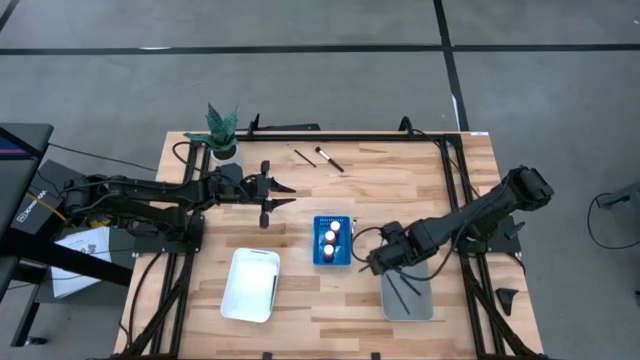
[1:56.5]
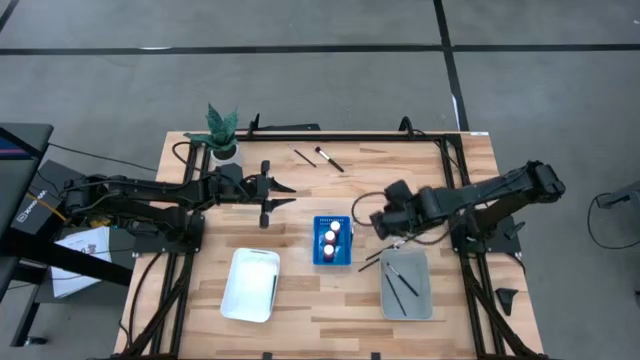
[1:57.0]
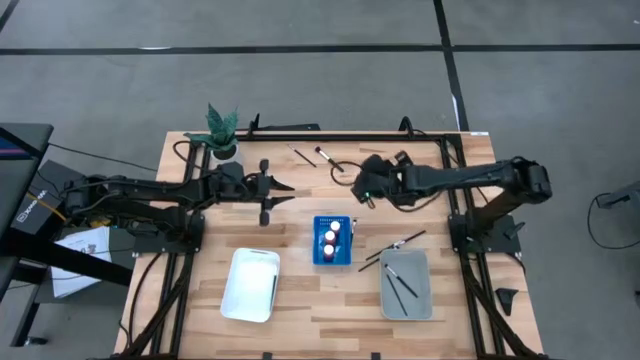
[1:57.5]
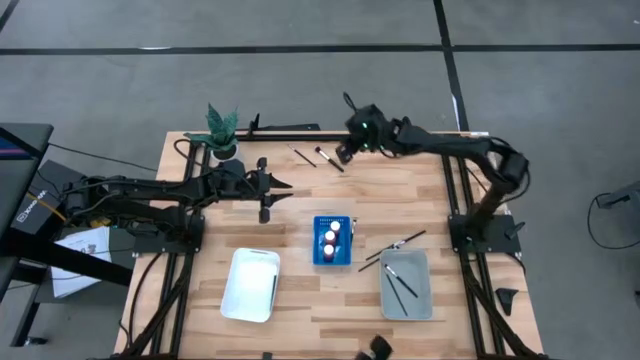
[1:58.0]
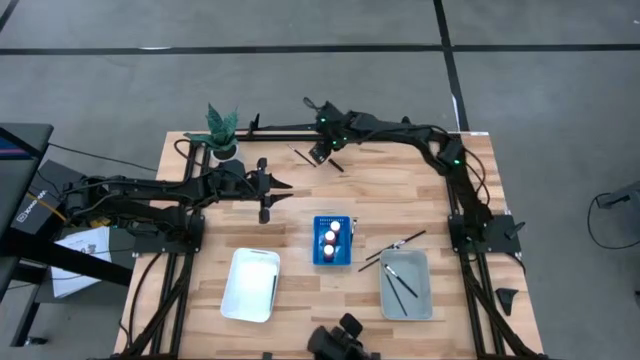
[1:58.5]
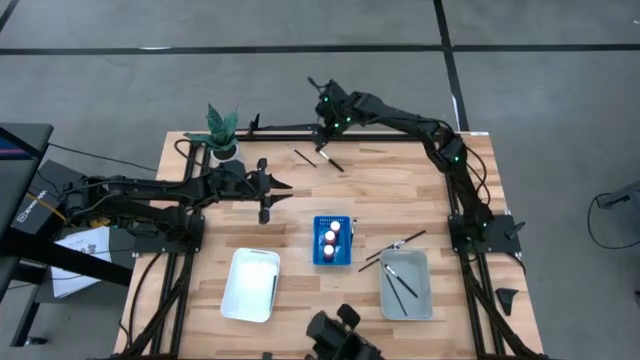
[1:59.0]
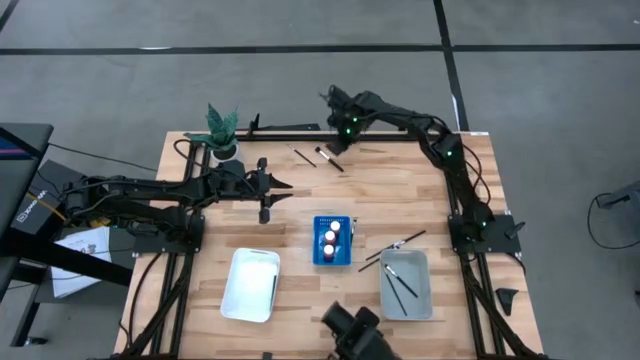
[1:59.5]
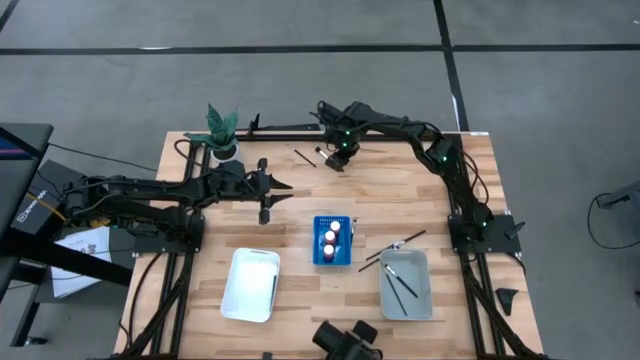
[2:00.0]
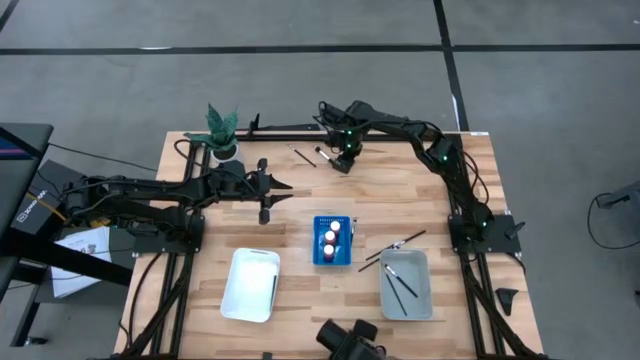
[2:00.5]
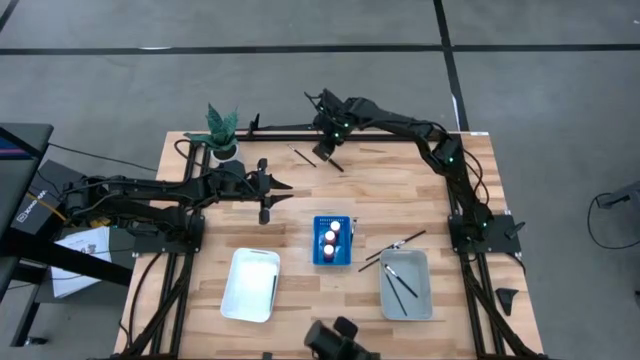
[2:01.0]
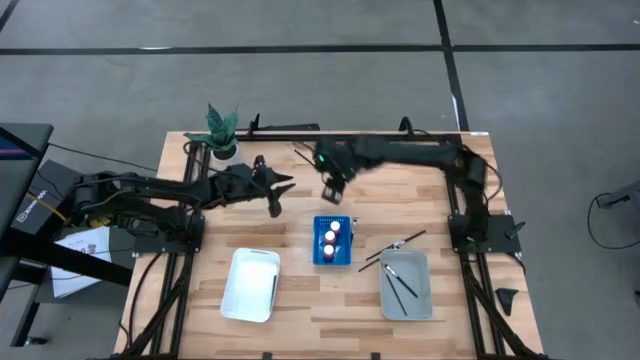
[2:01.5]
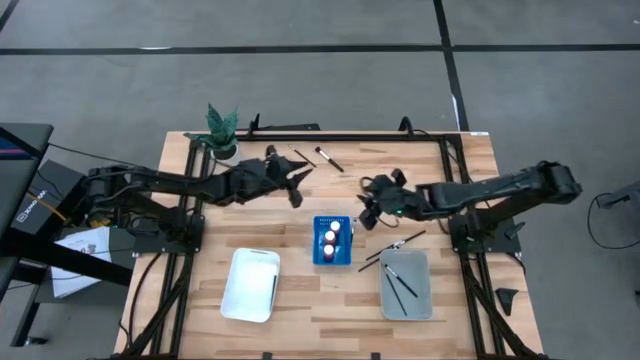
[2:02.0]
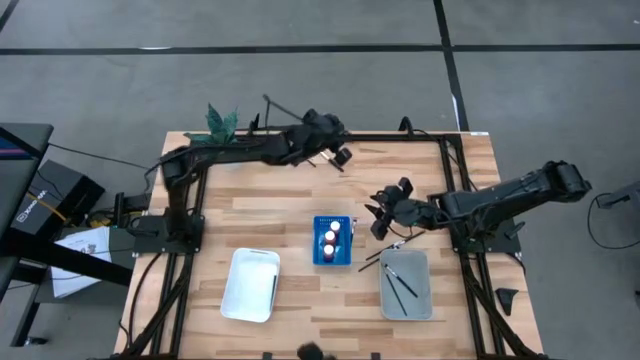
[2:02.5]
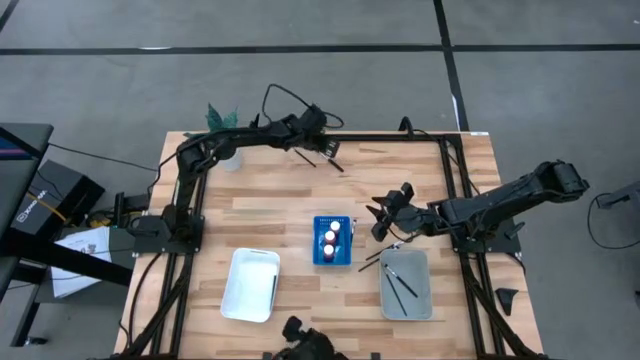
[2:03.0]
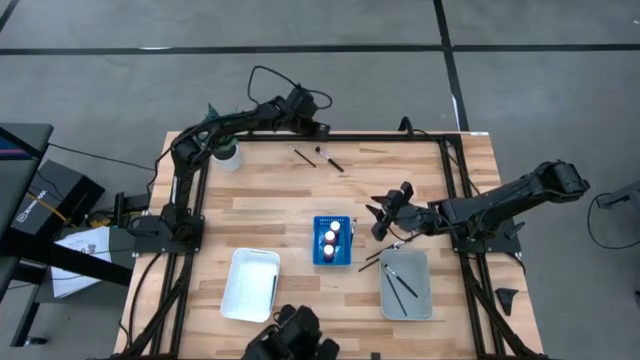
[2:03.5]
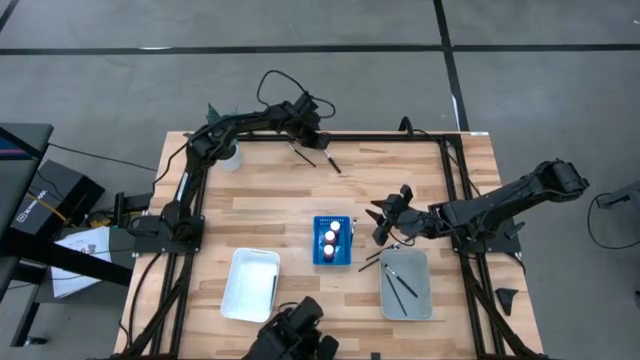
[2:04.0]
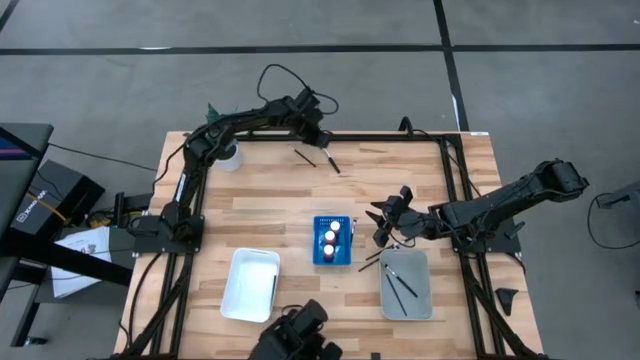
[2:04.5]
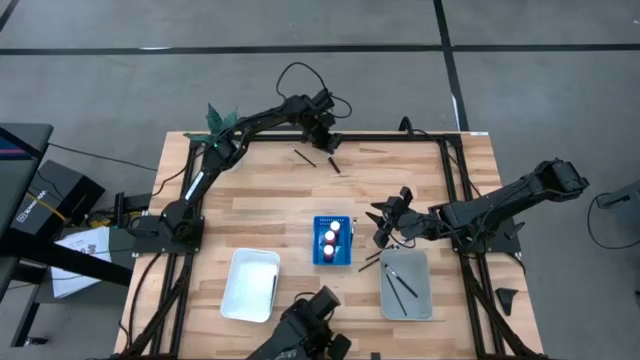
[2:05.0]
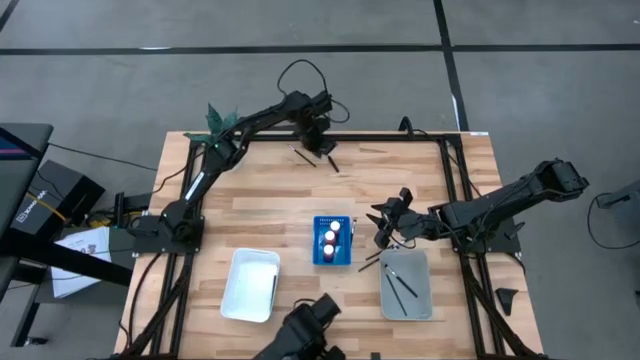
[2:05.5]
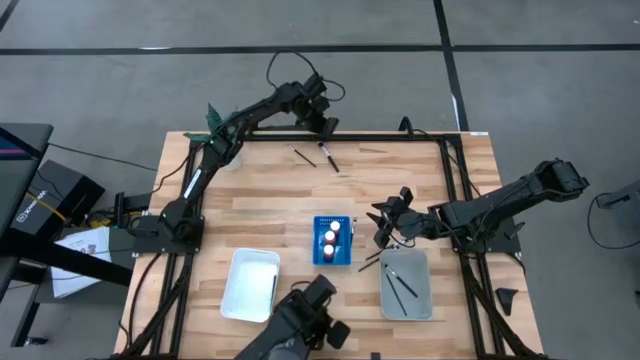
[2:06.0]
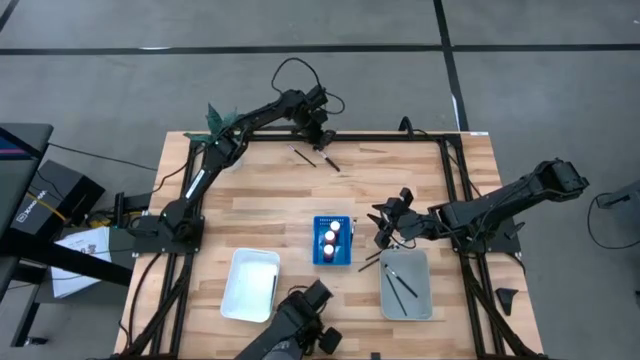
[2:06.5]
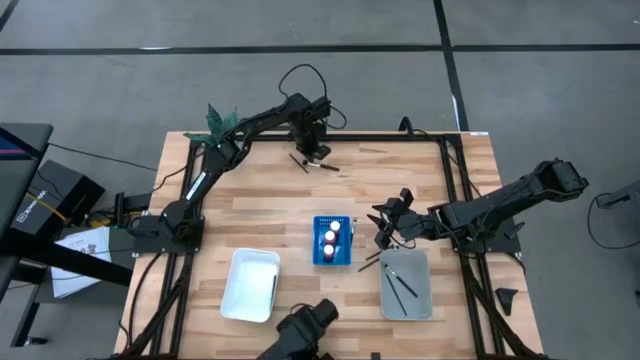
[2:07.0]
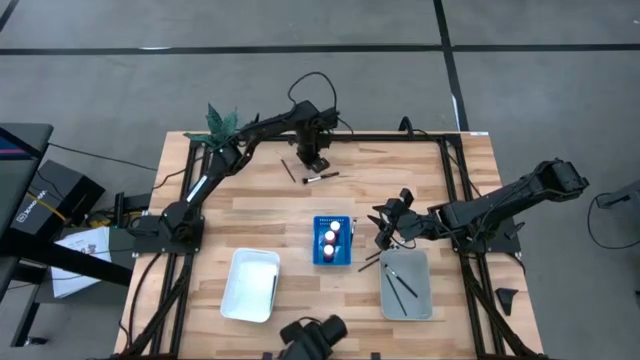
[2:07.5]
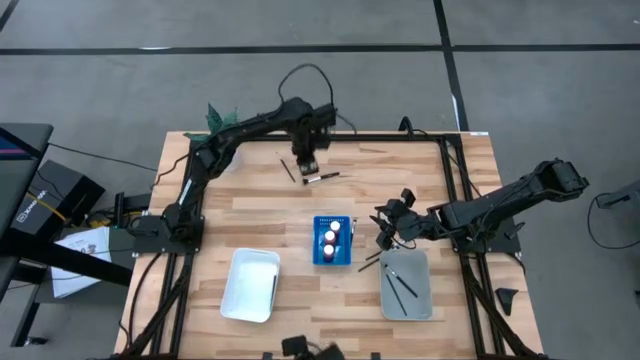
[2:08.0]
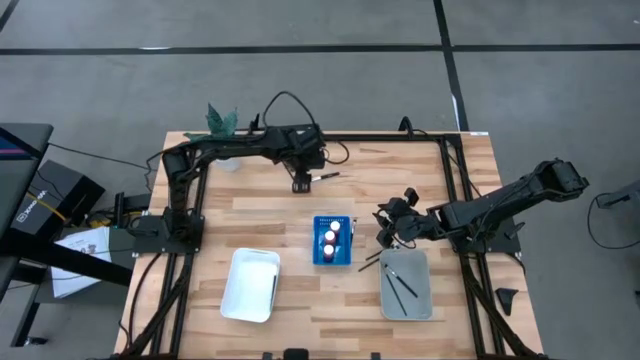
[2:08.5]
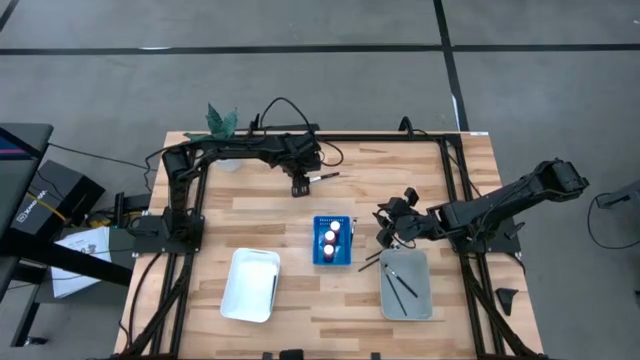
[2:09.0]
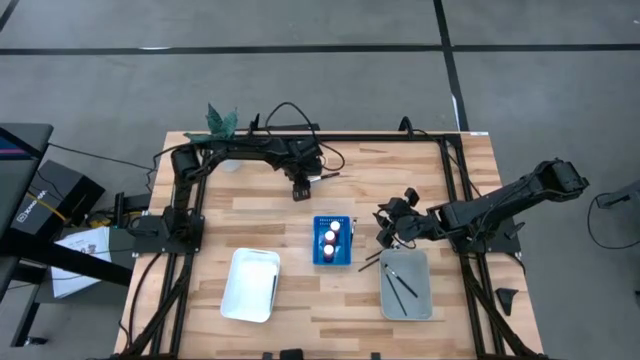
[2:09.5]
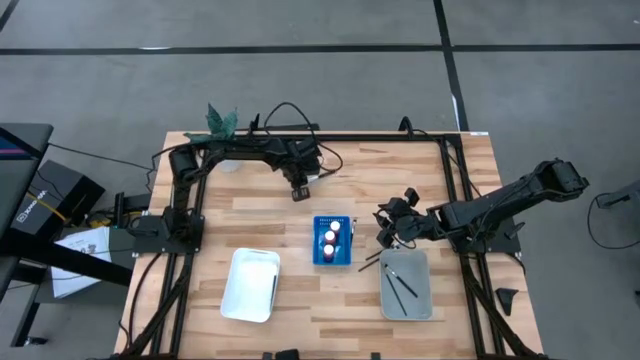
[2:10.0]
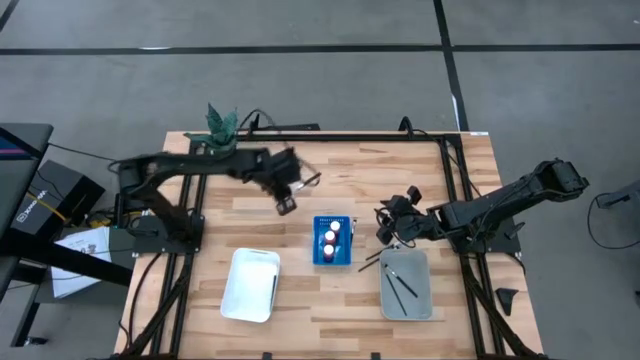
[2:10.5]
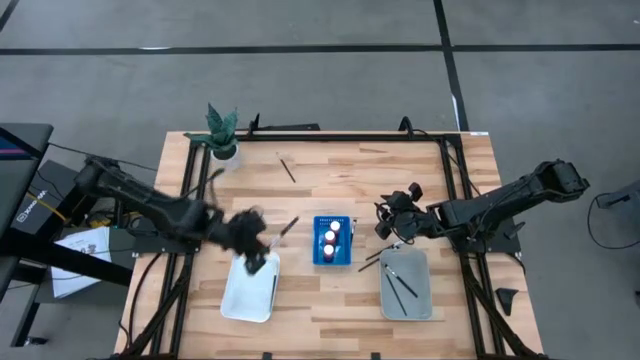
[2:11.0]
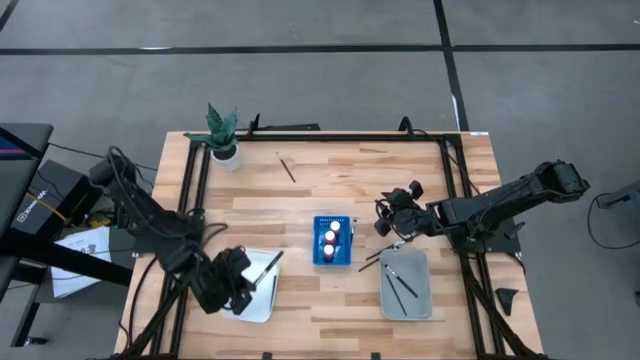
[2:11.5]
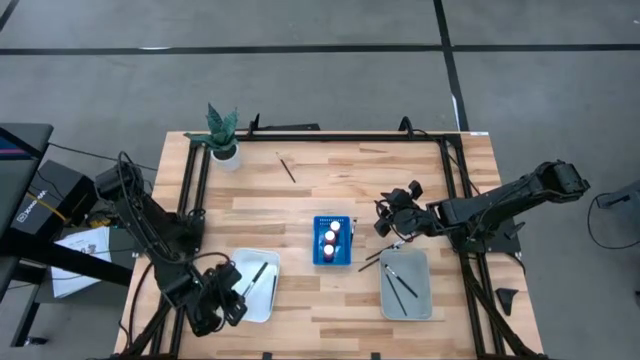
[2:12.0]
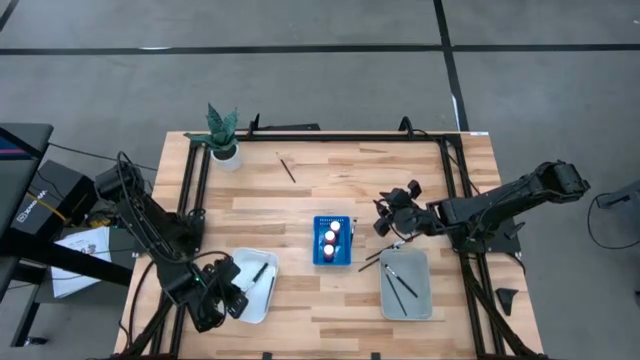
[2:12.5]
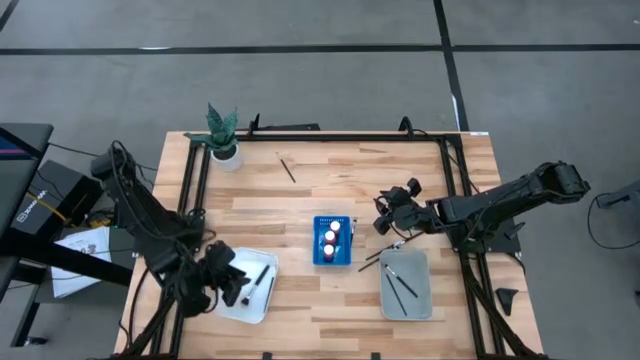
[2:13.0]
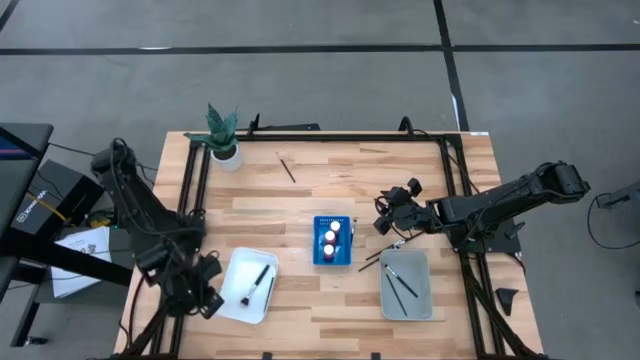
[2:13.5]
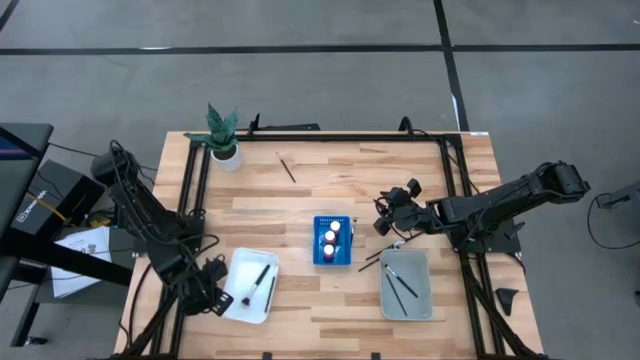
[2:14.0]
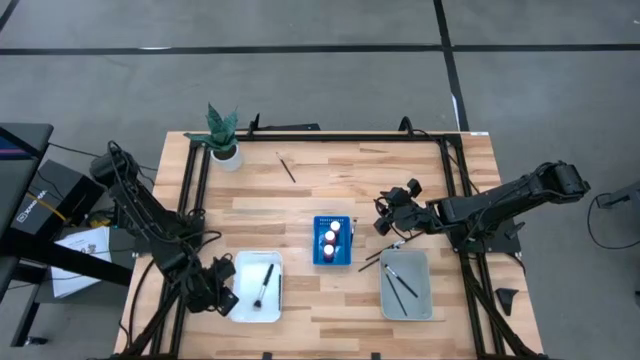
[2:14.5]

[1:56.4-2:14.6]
Task: Pick & Place Paint Supplies
Put the powder brush into the white bin

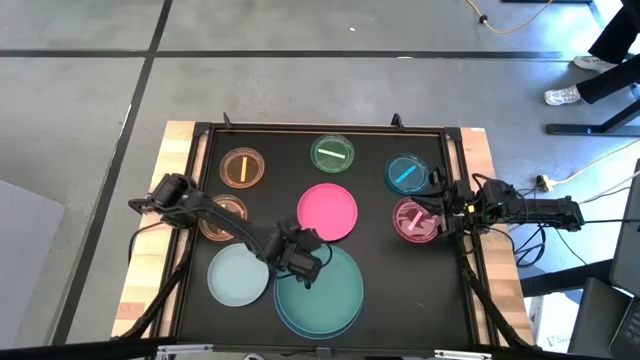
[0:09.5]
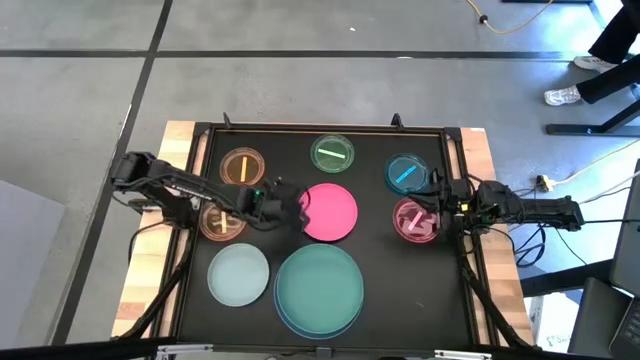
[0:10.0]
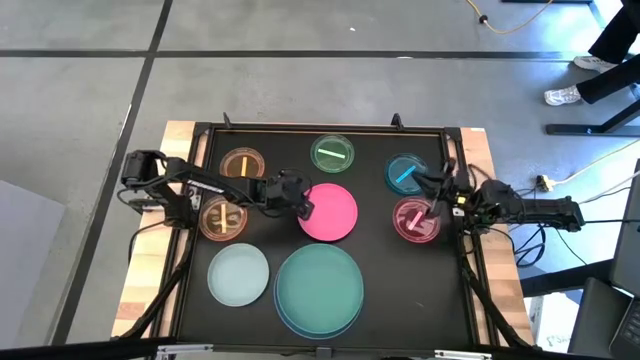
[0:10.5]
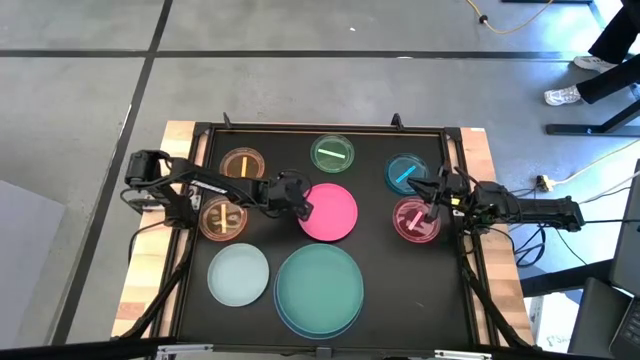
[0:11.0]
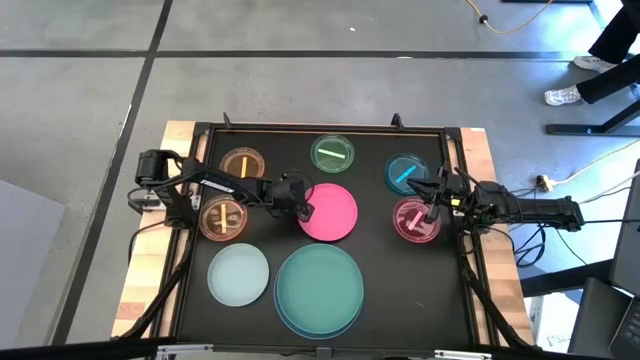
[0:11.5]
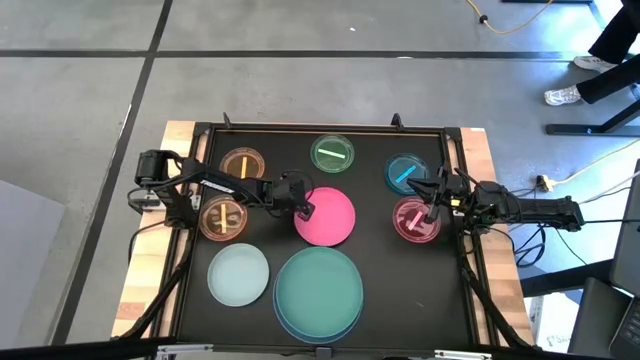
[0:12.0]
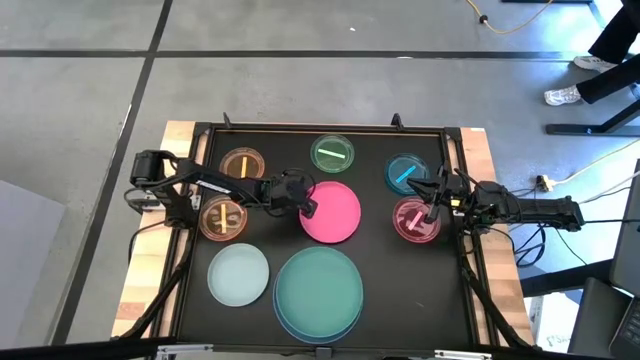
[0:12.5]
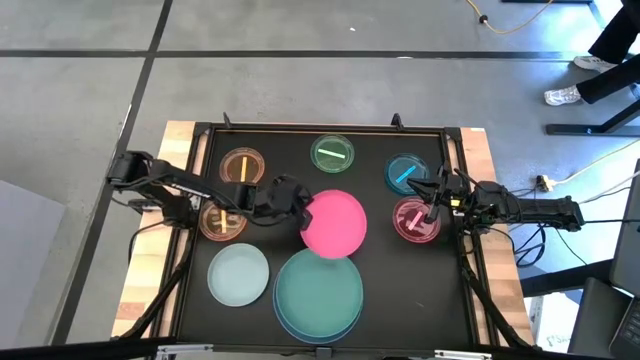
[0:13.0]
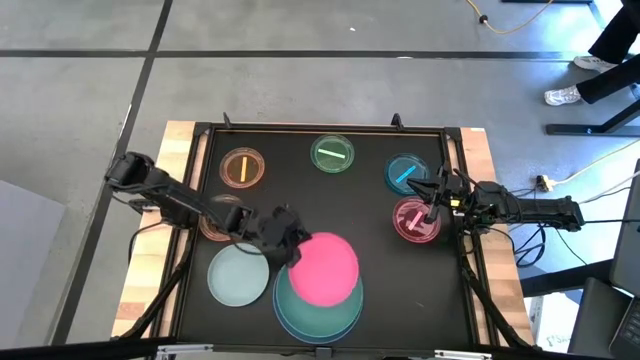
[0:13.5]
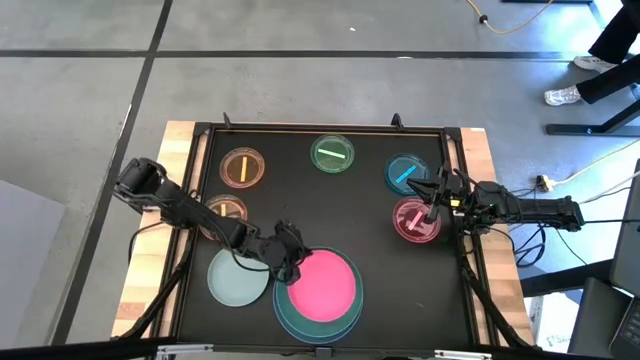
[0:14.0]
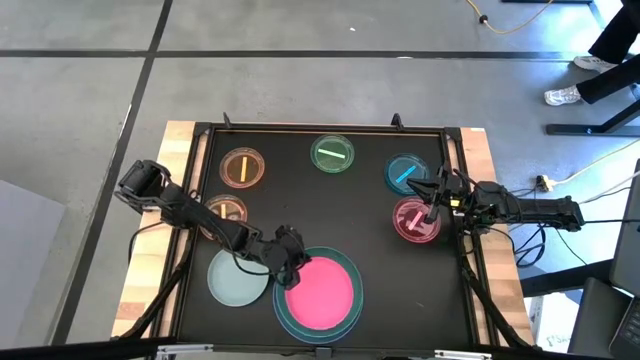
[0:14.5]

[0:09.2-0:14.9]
Task: Stack plastic plates
Stack the dark pink plate on the dark green plate
